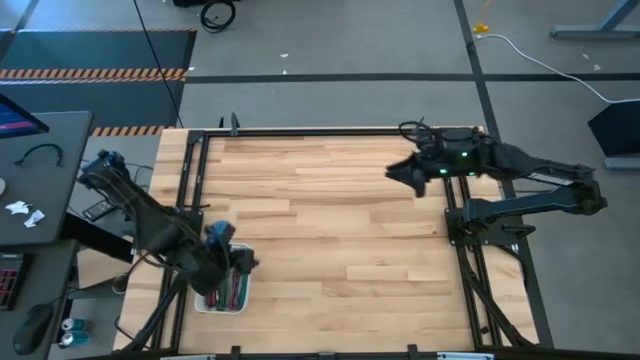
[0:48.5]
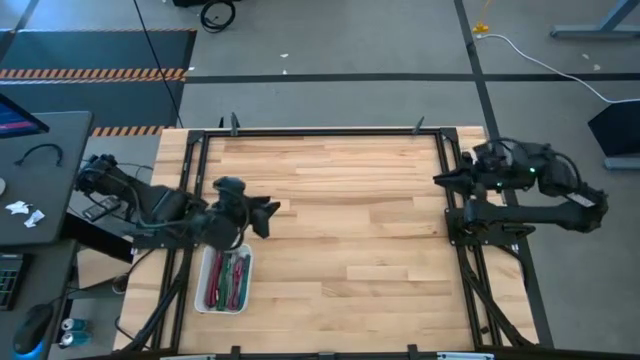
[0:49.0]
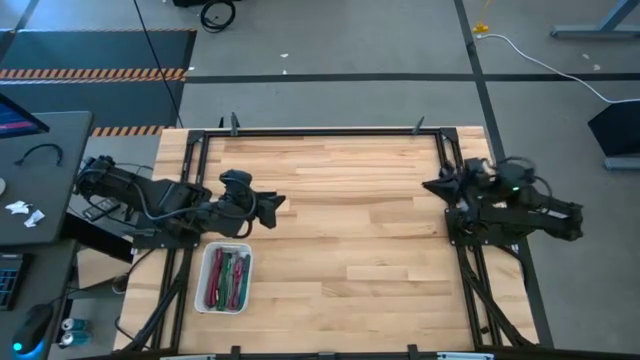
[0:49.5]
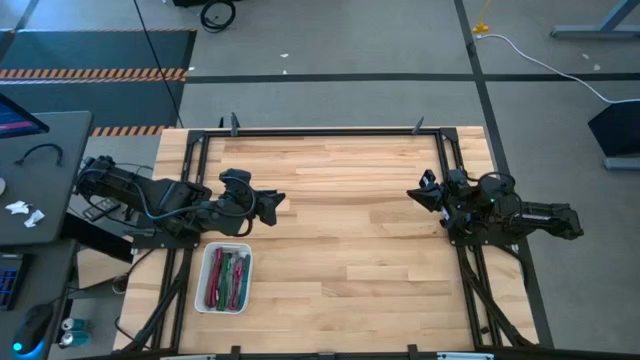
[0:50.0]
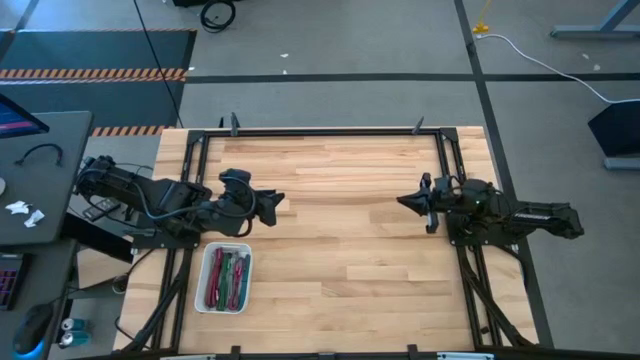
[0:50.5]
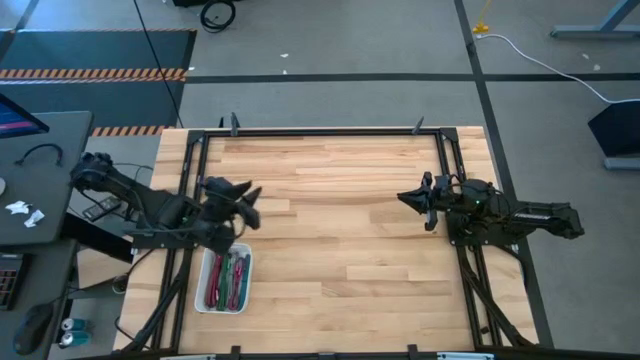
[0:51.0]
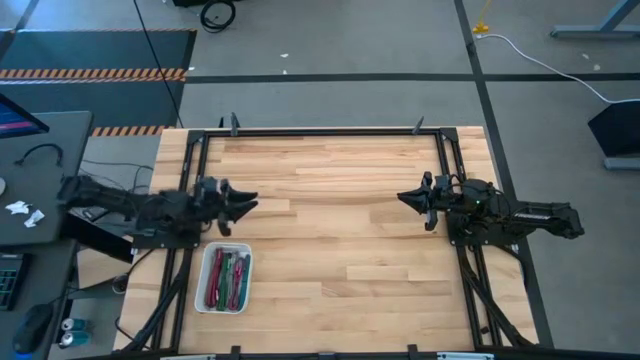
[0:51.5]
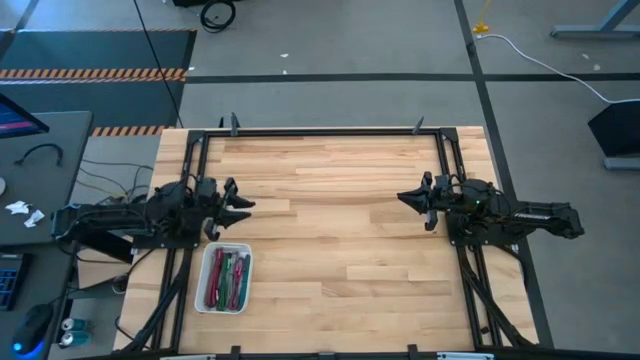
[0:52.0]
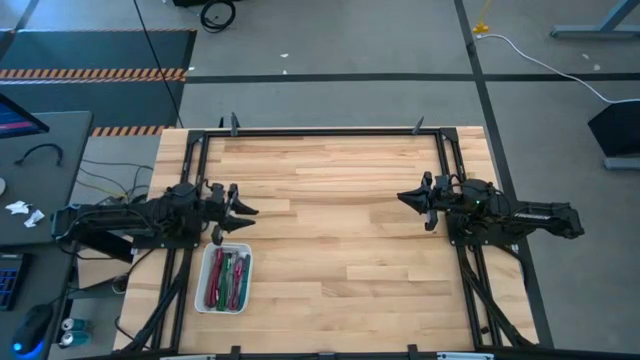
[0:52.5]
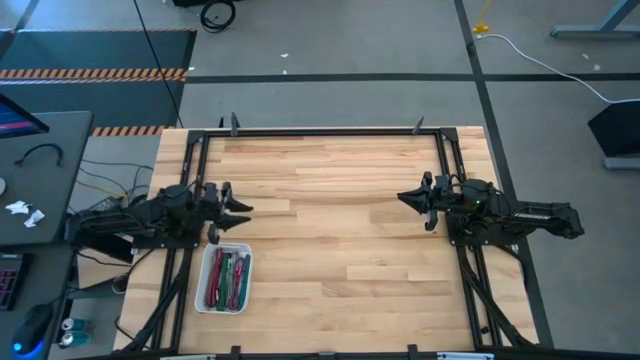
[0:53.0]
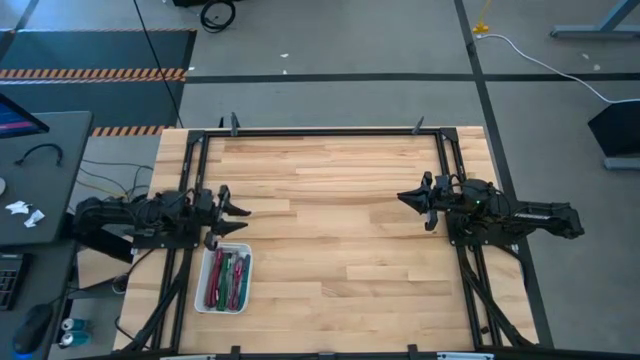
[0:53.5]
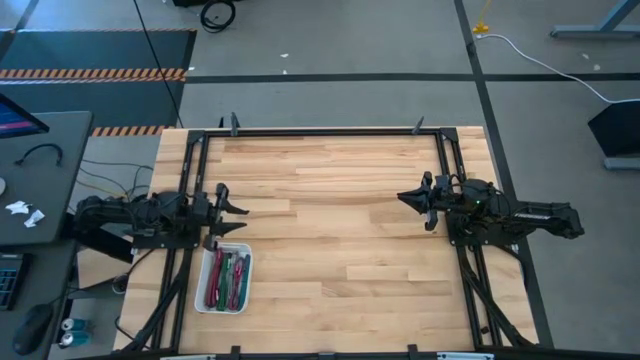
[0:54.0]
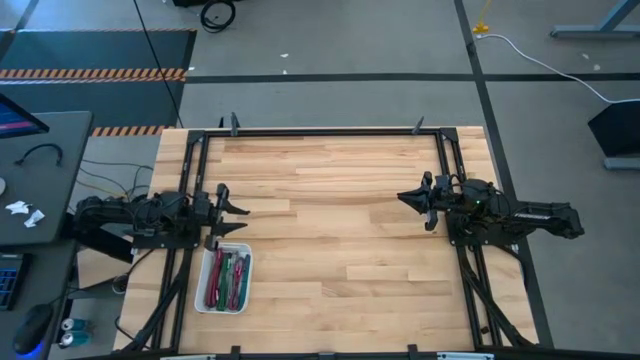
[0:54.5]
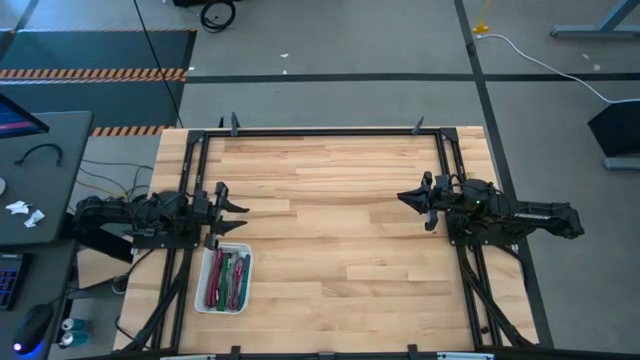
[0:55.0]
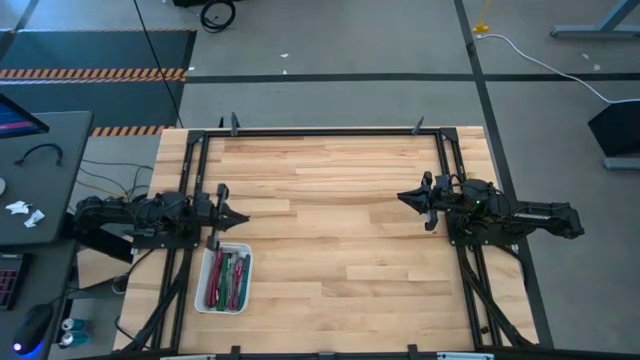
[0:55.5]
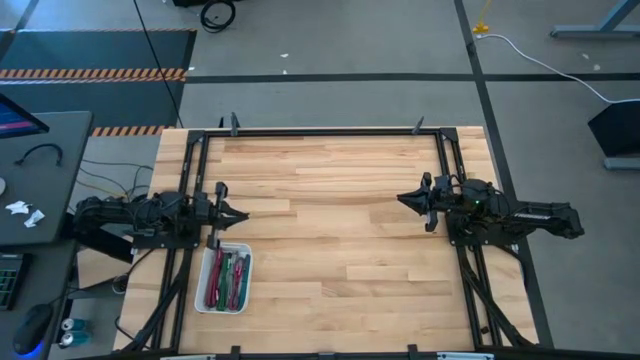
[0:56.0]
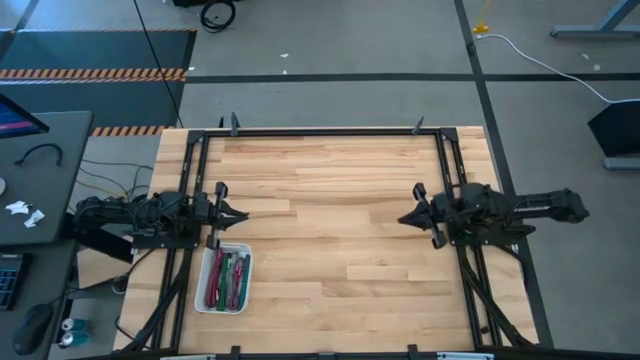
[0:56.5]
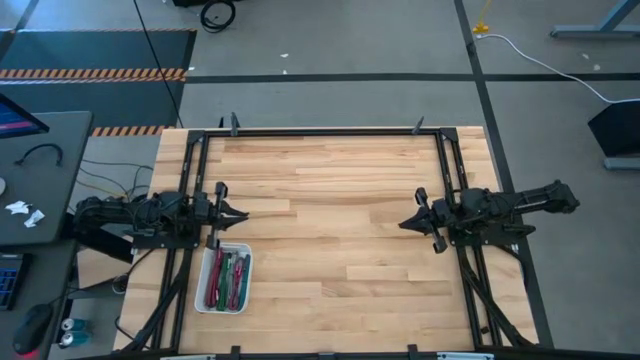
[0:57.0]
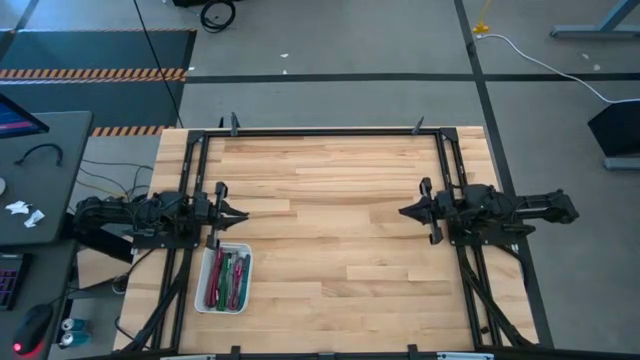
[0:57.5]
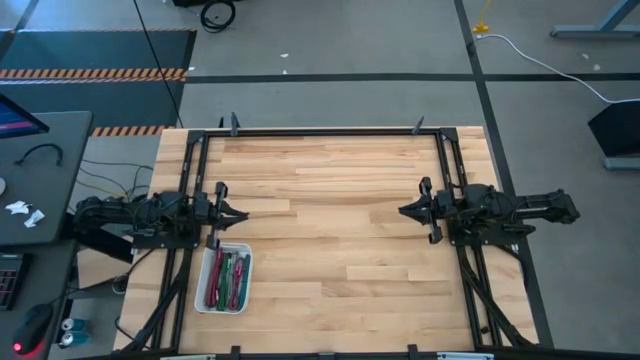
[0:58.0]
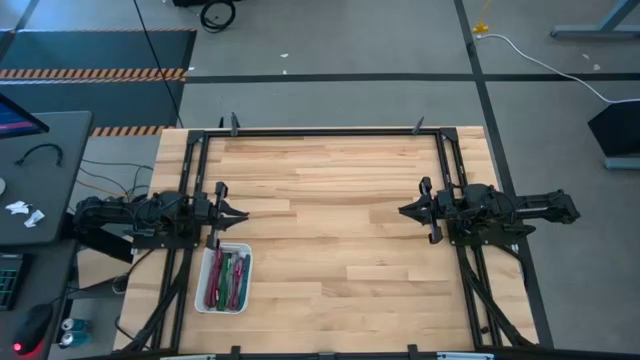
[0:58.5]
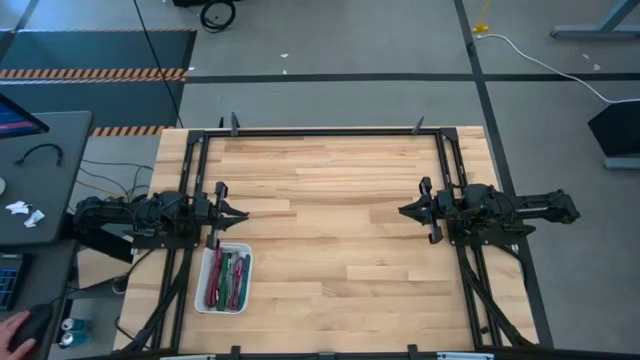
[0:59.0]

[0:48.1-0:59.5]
Task: Pick and place USB-C Cables
Return to Home Position

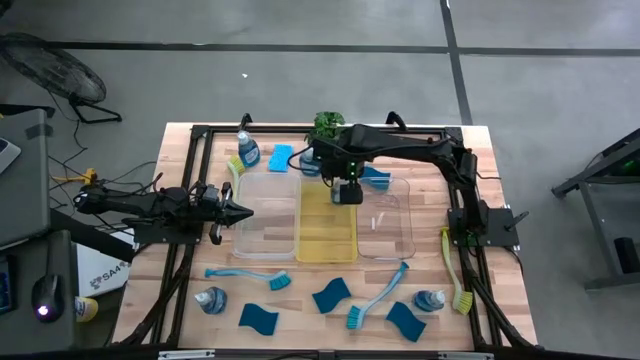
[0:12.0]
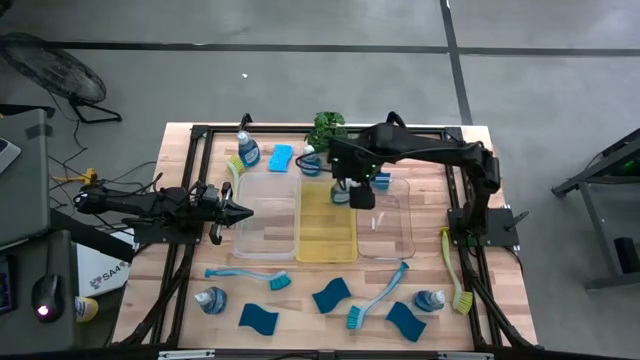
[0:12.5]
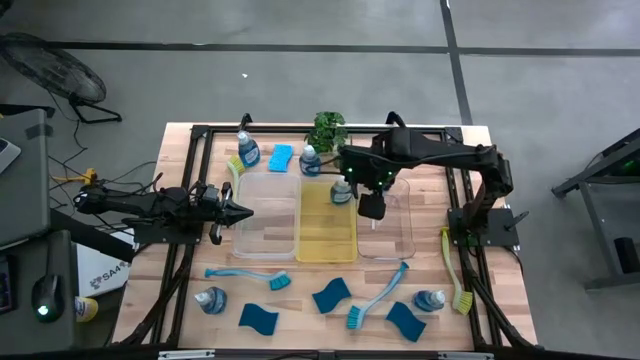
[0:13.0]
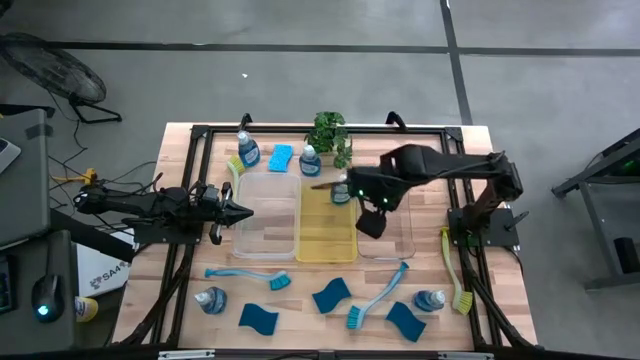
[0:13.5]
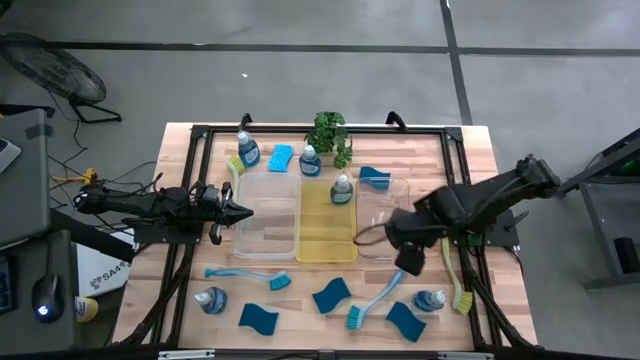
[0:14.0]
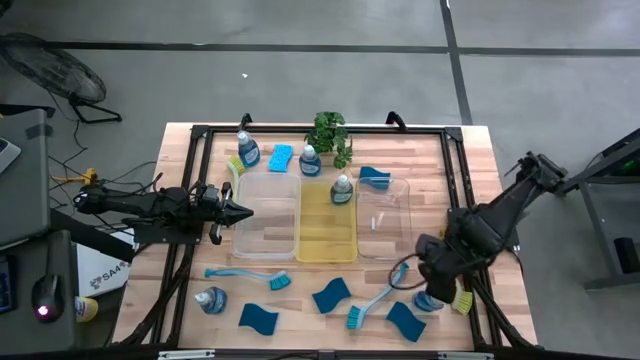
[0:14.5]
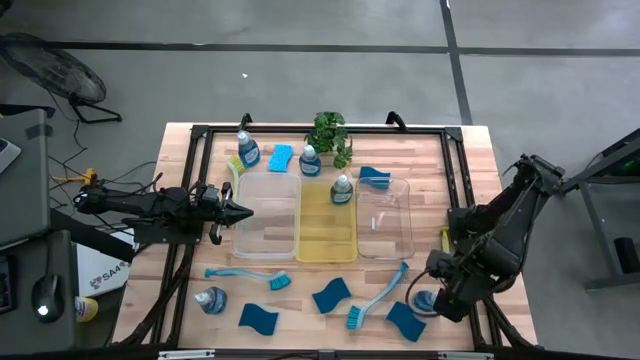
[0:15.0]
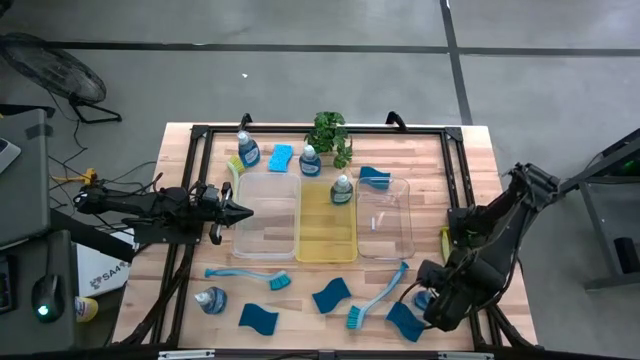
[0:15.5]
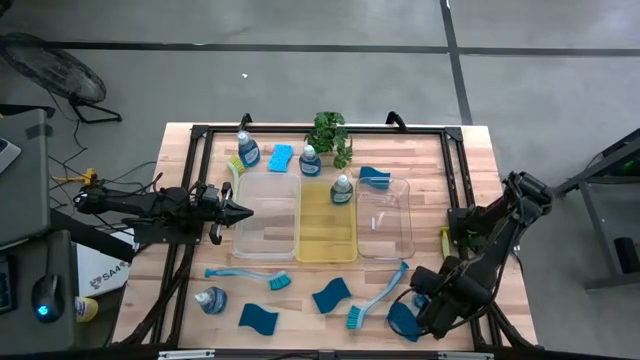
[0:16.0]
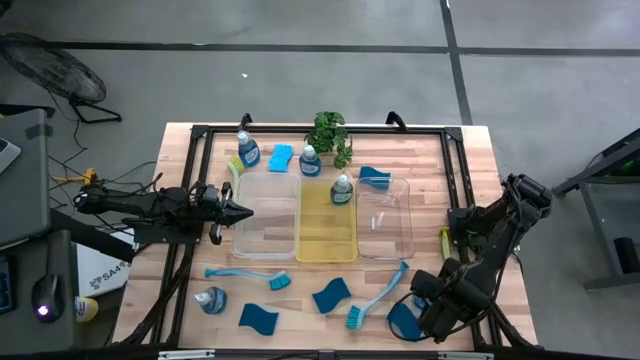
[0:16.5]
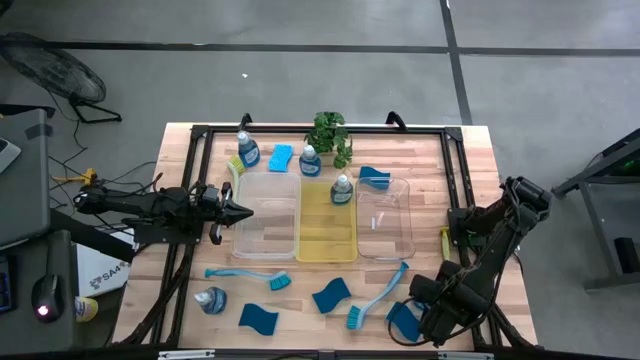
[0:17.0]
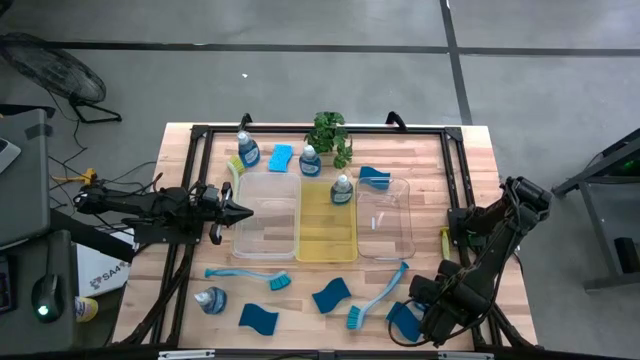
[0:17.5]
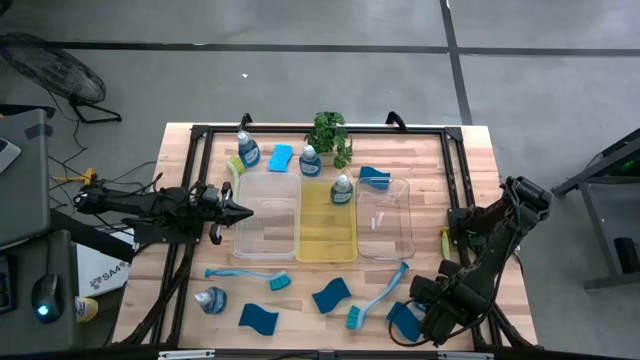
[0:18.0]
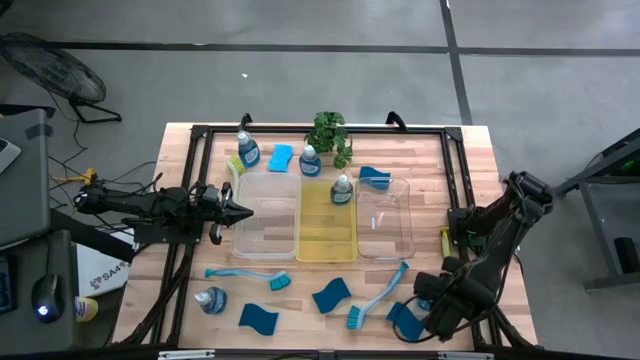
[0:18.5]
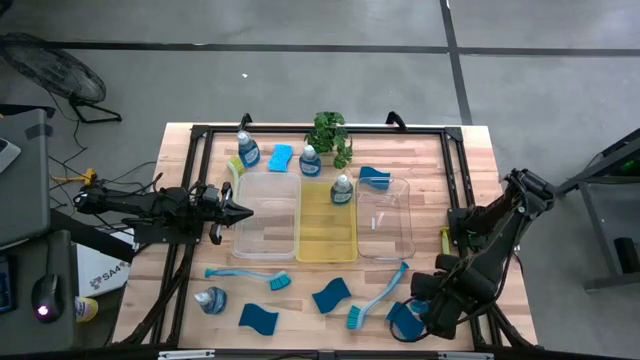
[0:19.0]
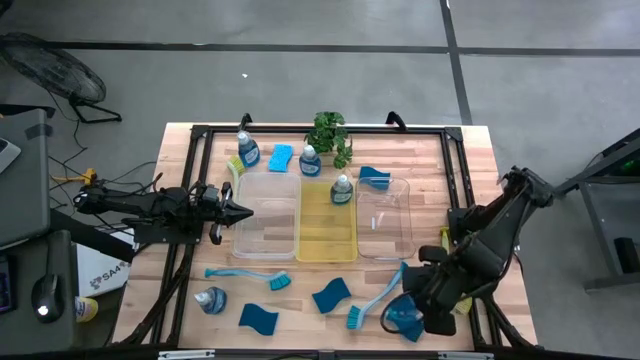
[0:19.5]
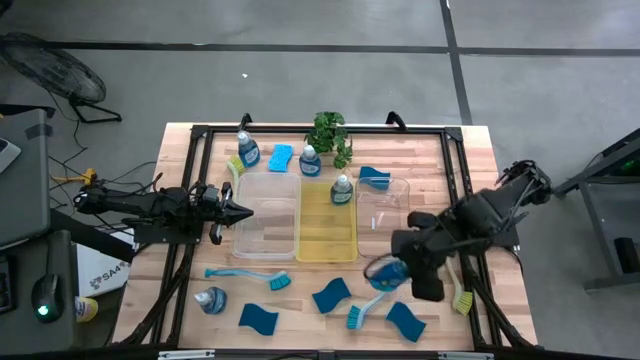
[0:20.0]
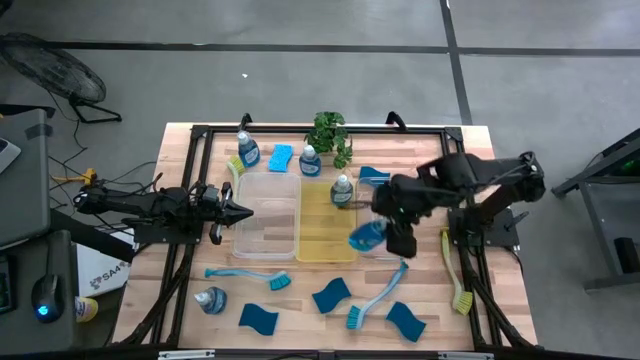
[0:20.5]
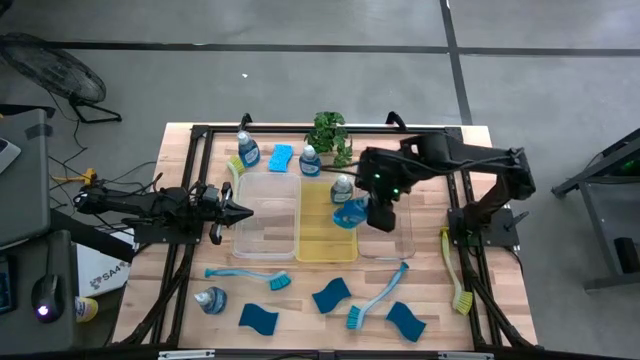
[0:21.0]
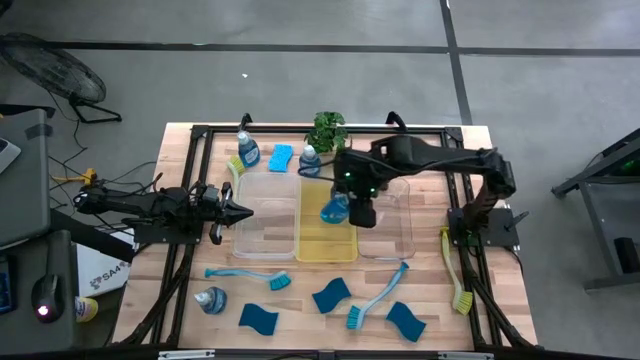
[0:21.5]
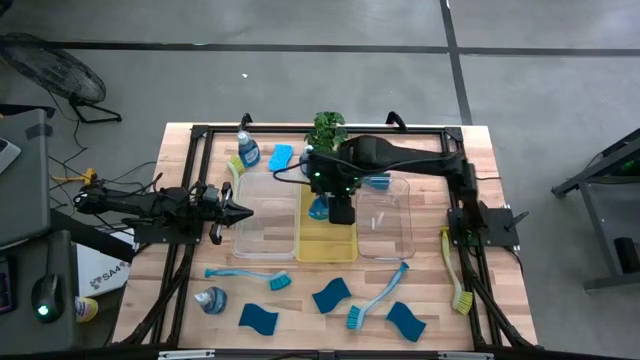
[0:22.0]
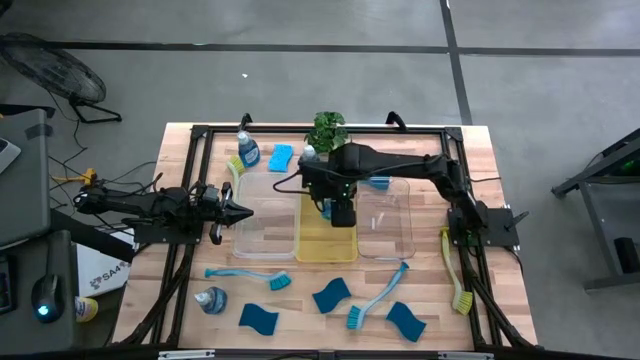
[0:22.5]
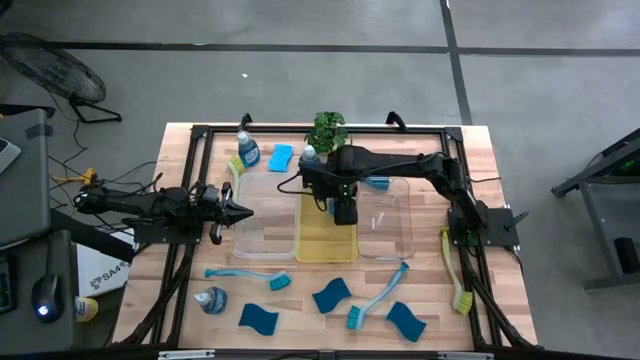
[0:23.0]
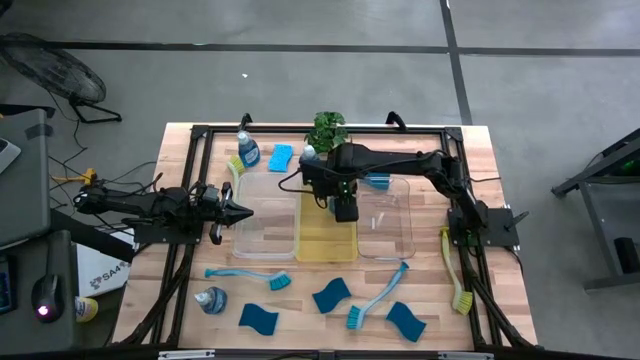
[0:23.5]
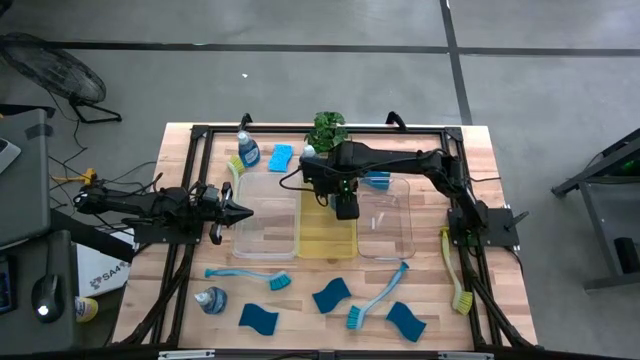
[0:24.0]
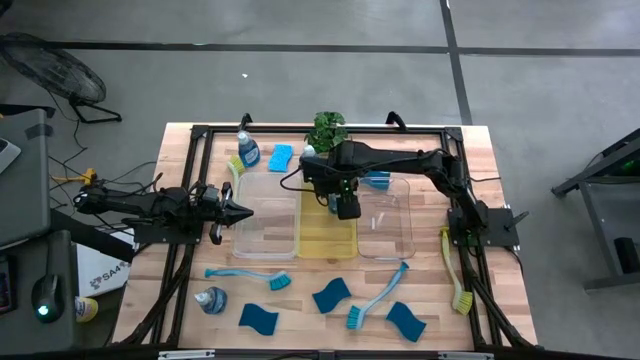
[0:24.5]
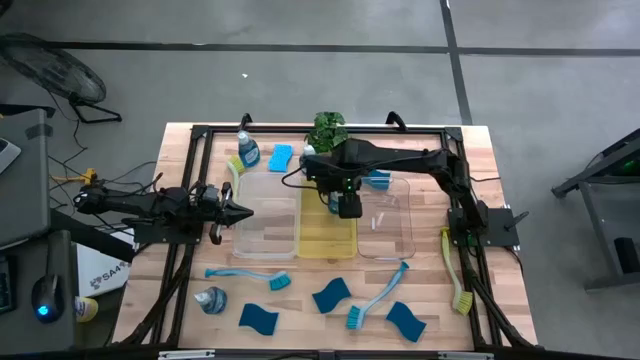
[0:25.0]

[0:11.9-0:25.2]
Task: Pick & Place Kitchen Sink Supplies
Put the dishwashing liquid bottle into the yellow bin
